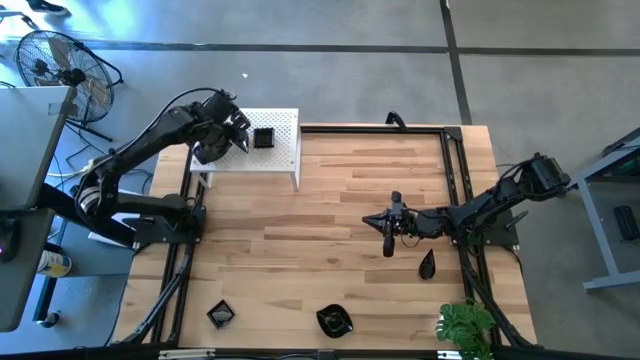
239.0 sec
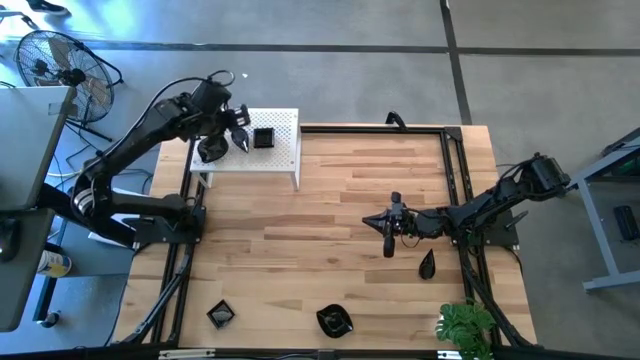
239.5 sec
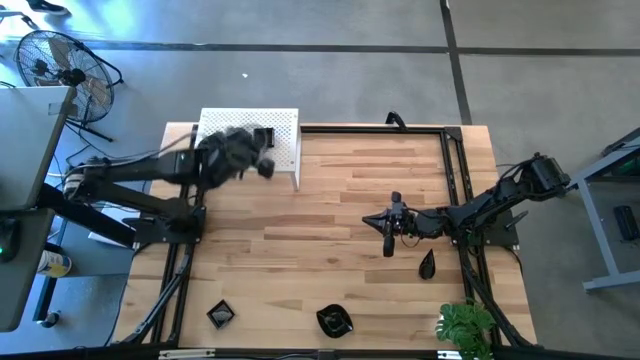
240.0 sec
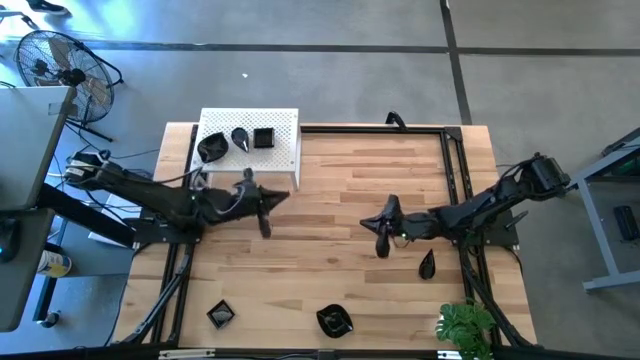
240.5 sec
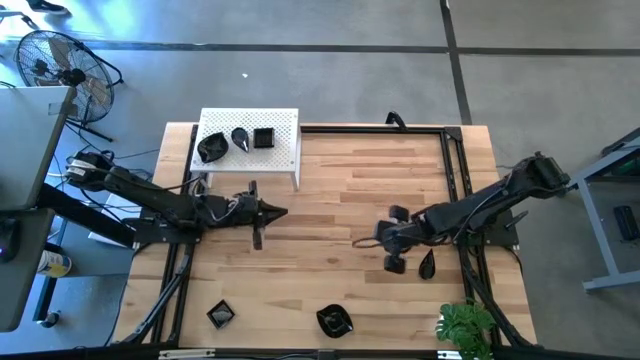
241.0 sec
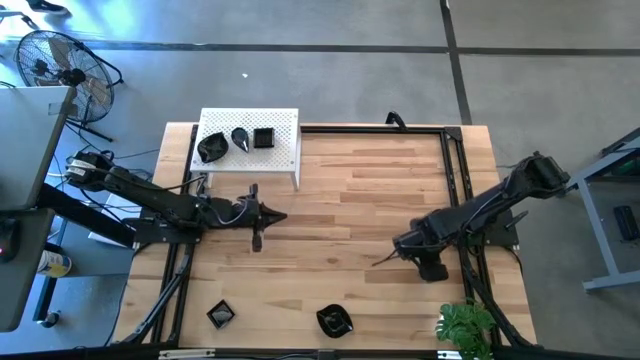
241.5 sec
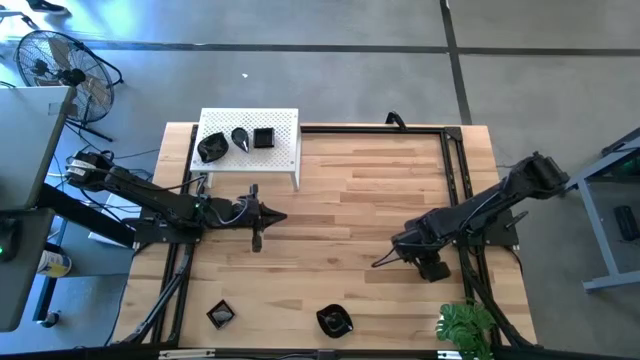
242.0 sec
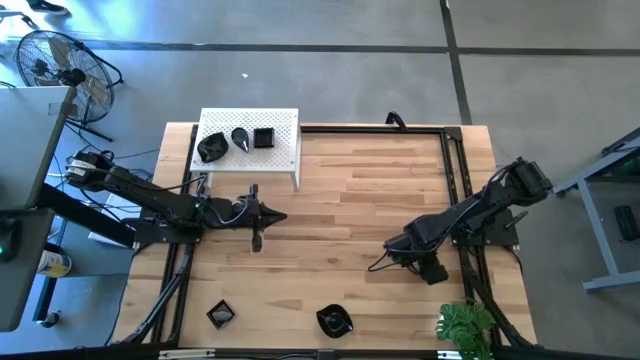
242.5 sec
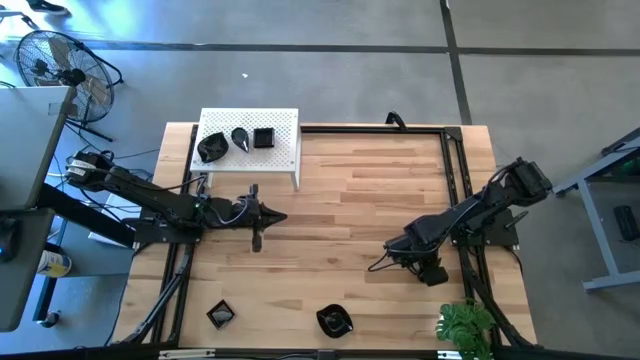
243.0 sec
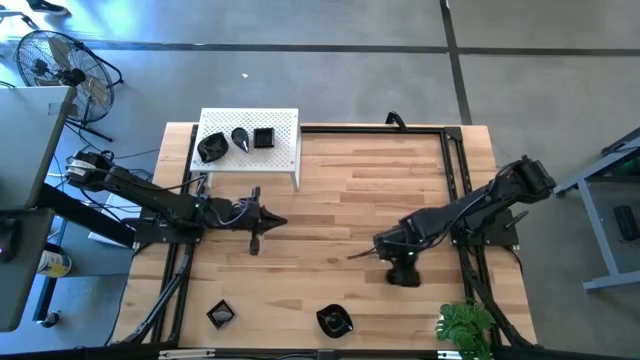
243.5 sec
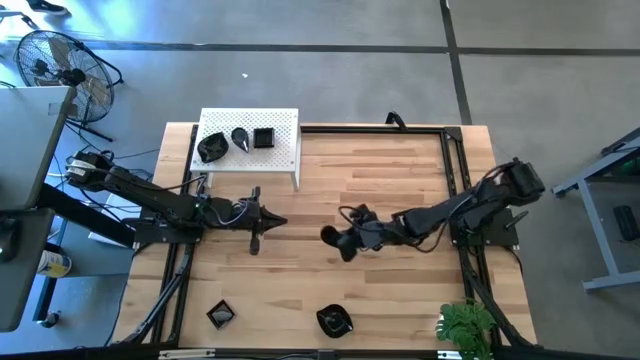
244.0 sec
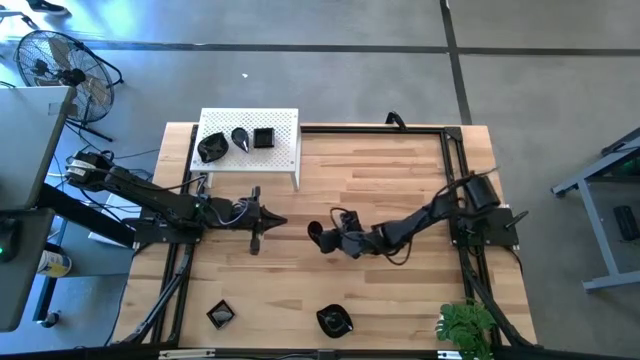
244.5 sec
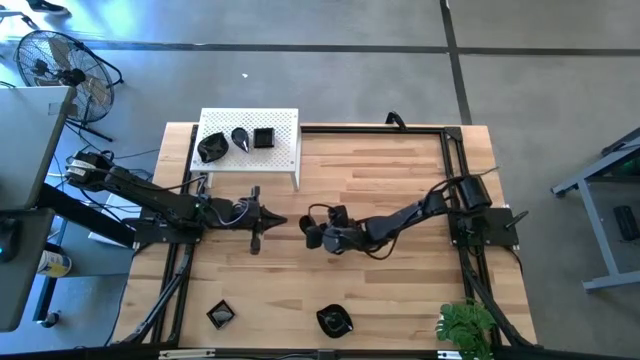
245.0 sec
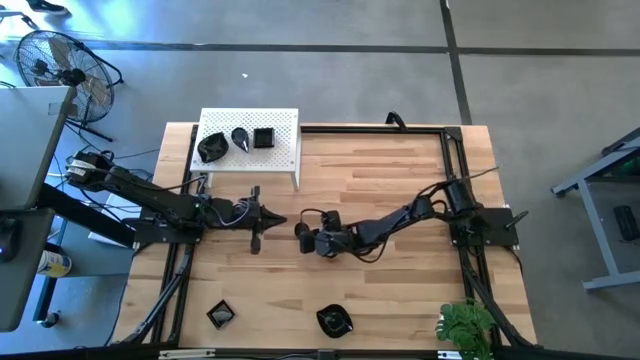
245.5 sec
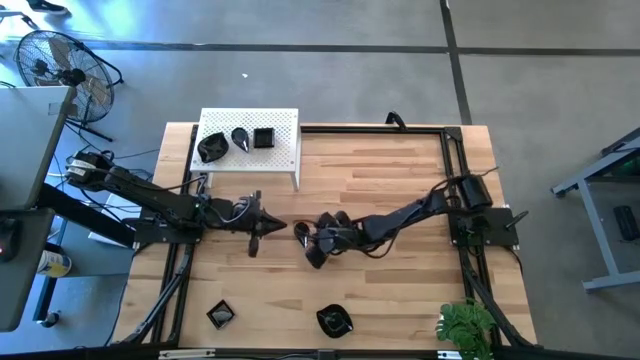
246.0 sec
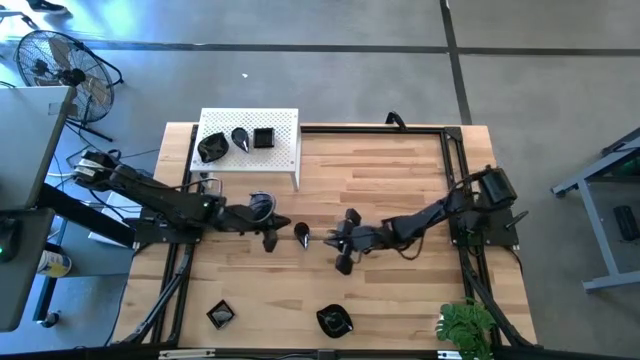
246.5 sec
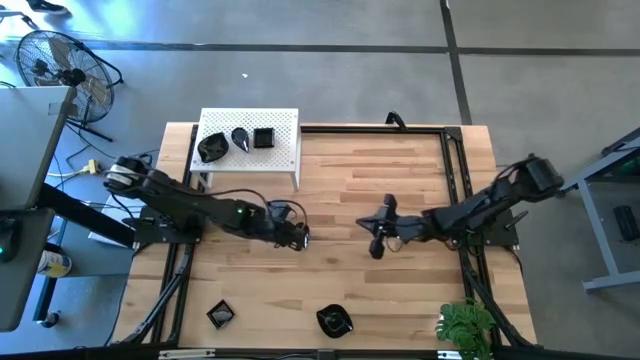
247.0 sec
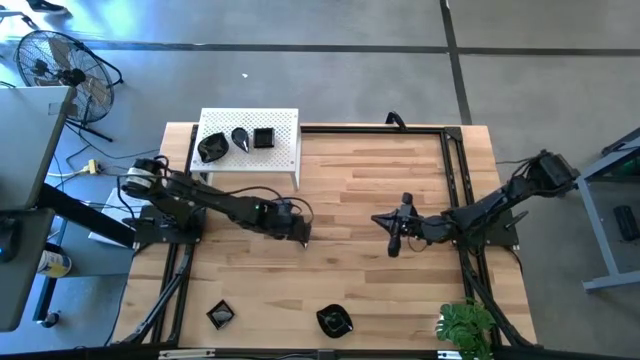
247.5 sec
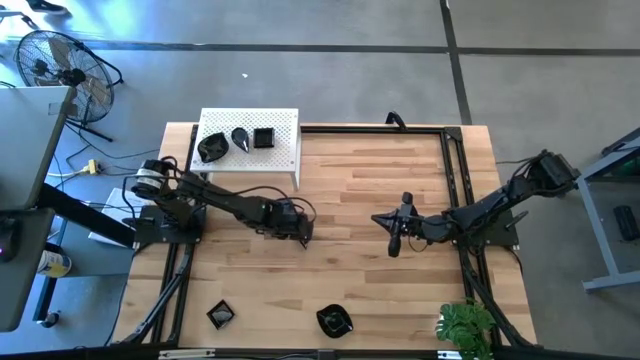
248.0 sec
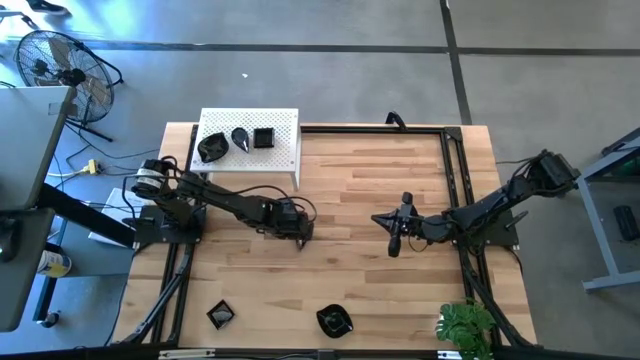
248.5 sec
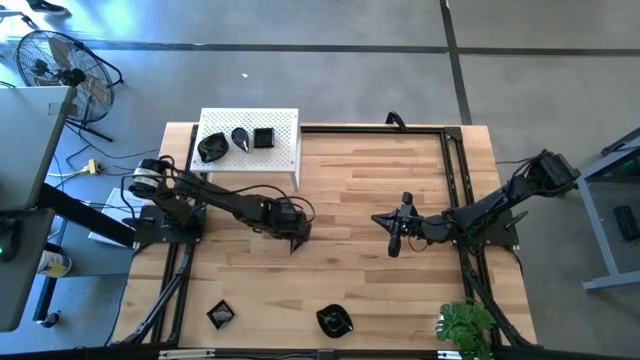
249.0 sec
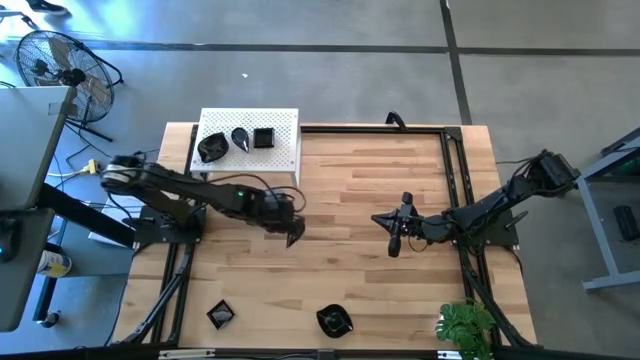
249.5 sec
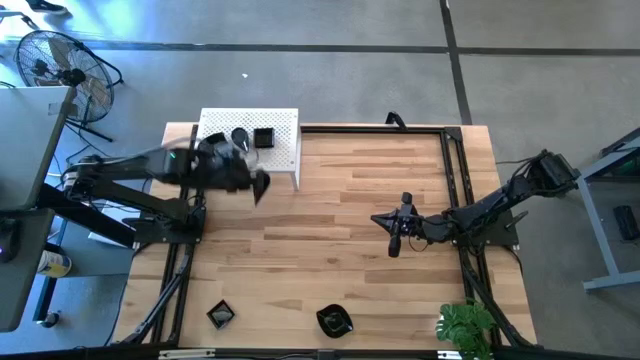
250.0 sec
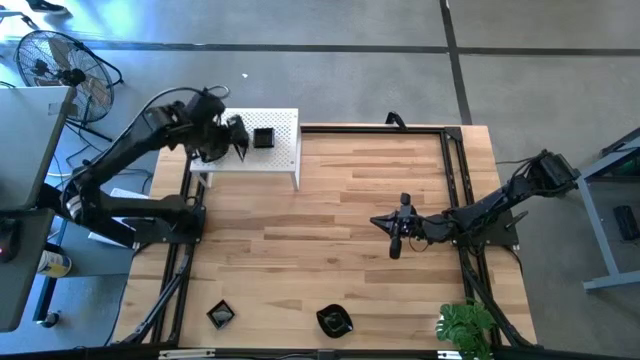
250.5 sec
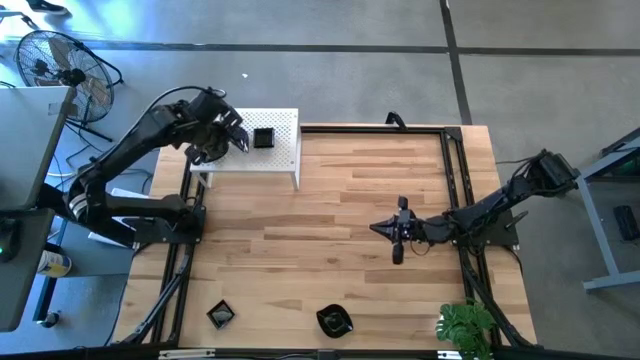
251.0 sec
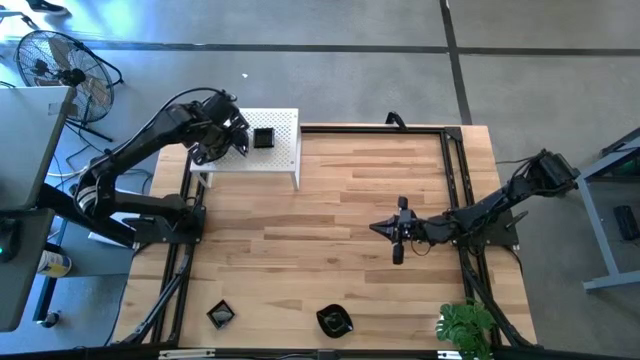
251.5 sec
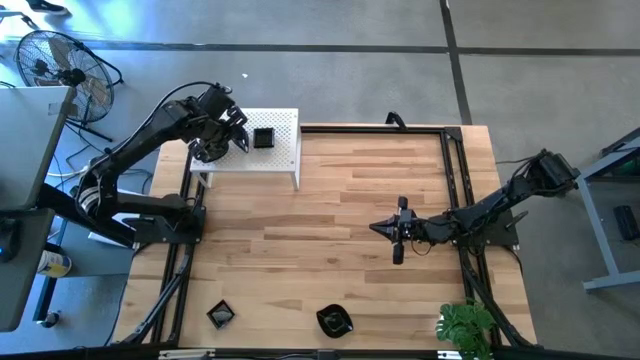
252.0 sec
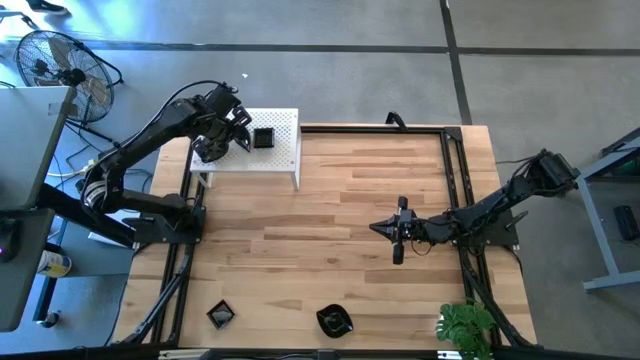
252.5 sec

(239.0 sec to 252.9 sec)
Task: Pick & Place Mini shaped plates
Stack the black drop shaped plate on top of the stacked black drop shaped plates on the shelf

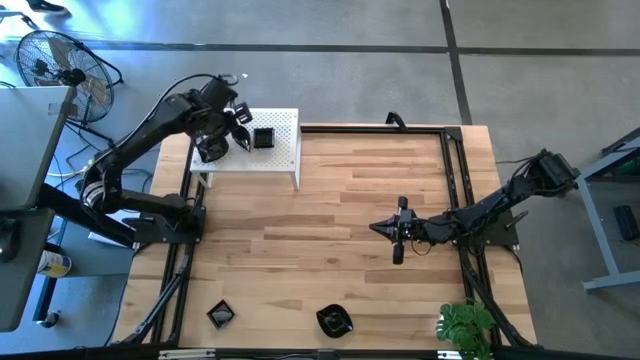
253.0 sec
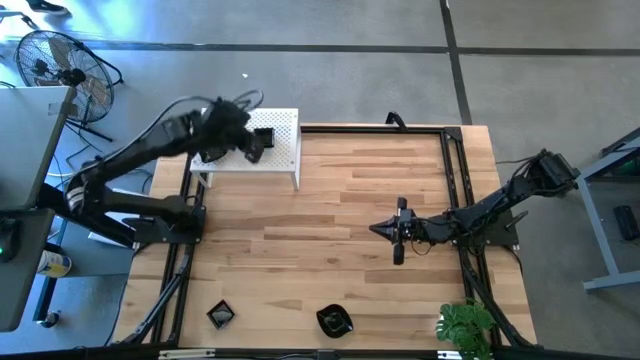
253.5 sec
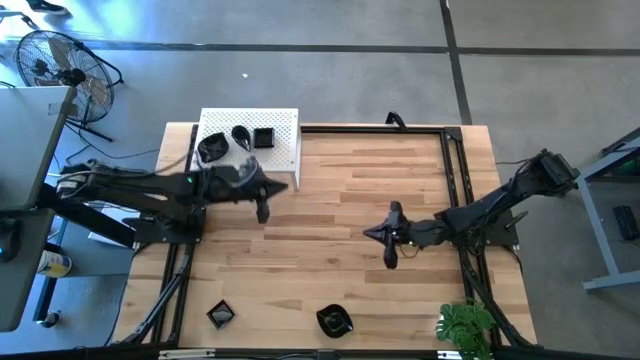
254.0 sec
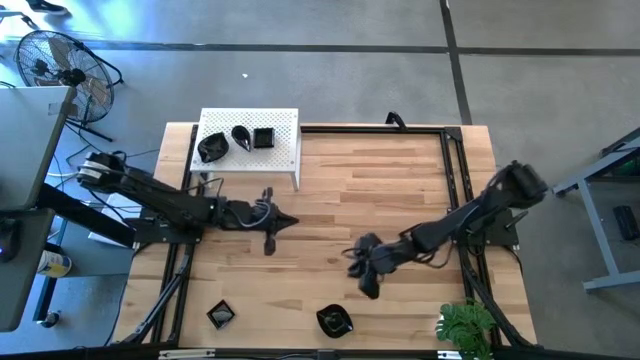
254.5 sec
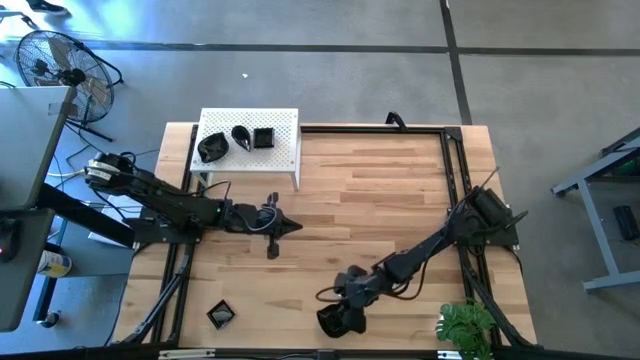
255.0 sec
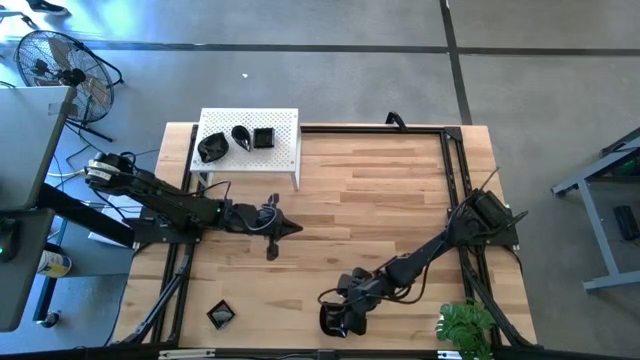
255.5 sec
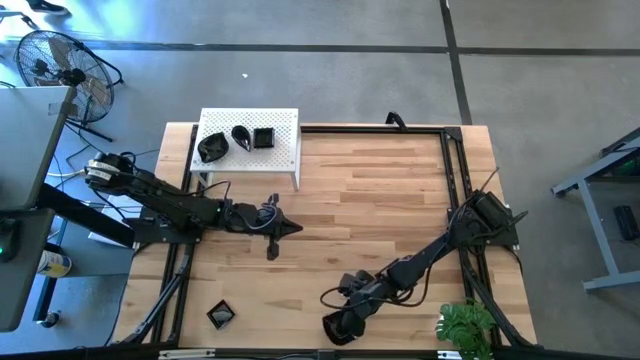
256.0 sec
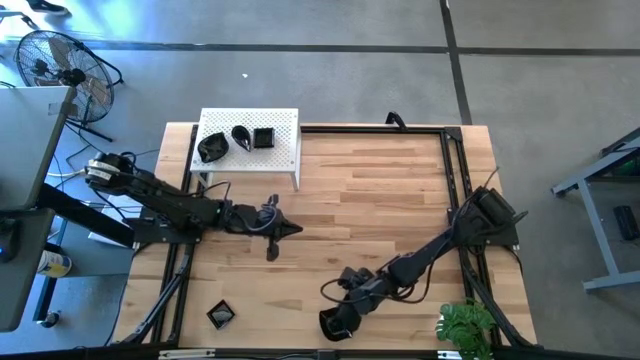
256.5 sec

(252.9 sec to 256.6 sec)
Stack the black leaf shaped plate on top of the stacked black leaf shaped plates on the shelf

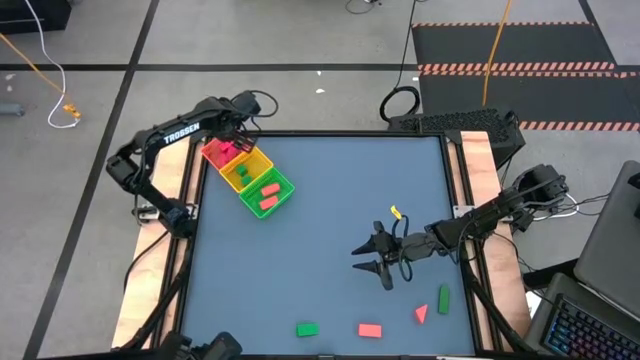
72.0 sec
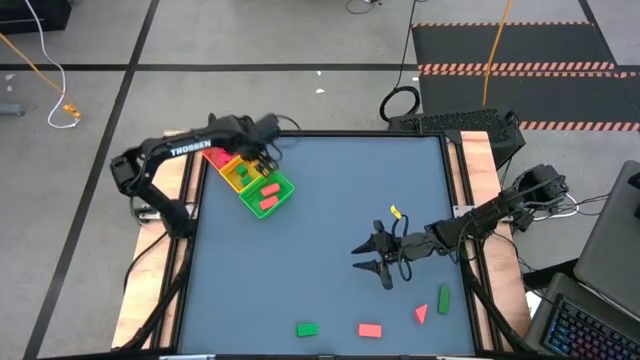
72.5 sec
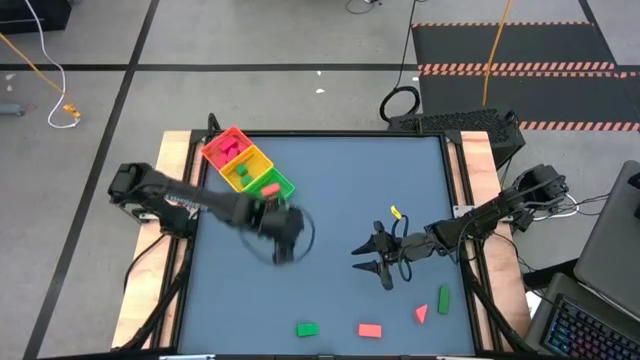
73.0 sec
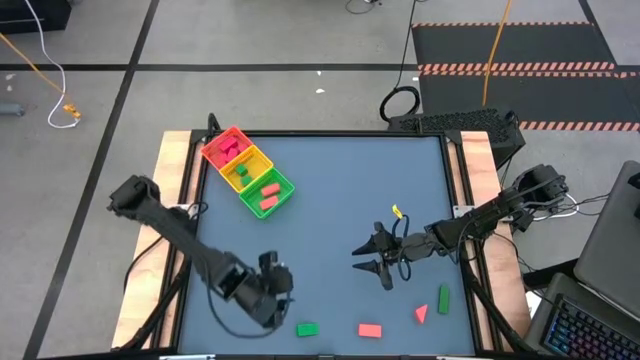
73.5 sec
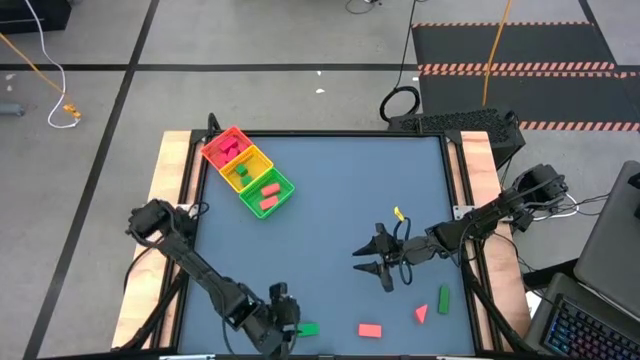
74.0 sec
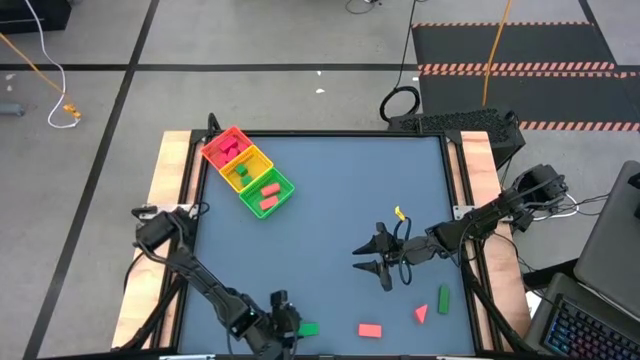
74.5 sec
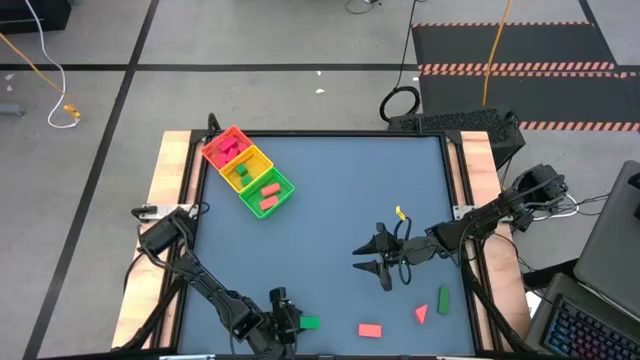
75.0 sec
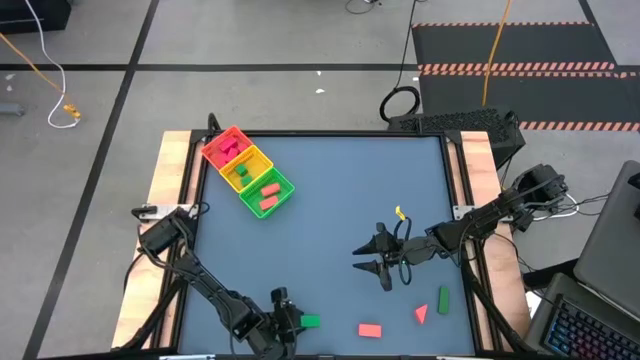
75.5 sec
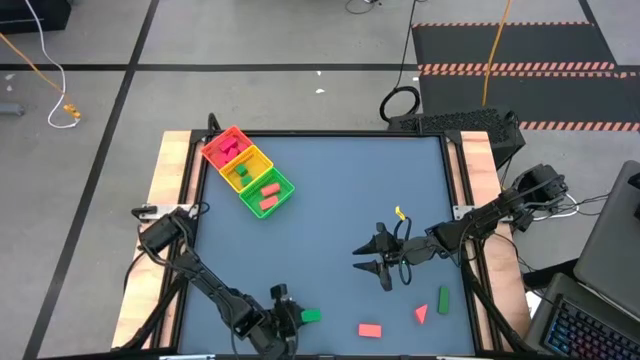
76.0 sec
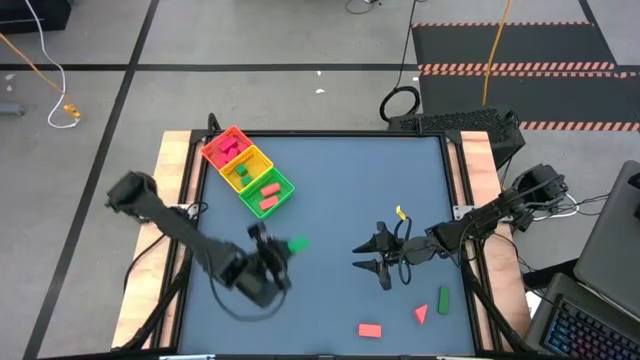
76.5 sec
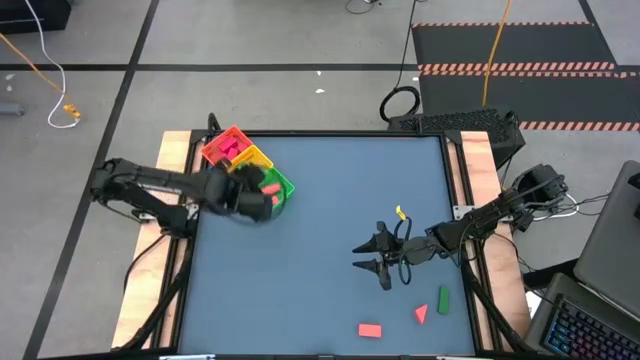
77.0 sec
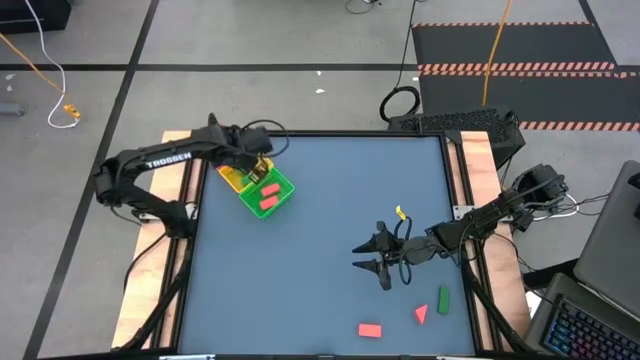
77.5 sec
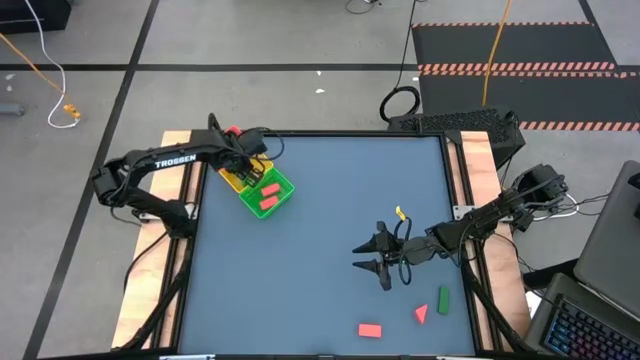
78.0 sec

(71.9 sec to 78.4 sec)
Task: Sort & place blocks by color
Put the green block piece on the left into the yellow basket
